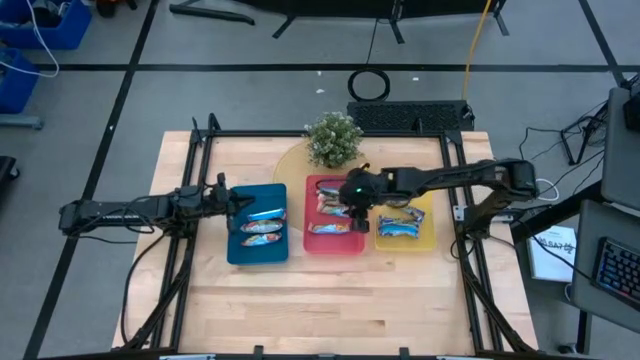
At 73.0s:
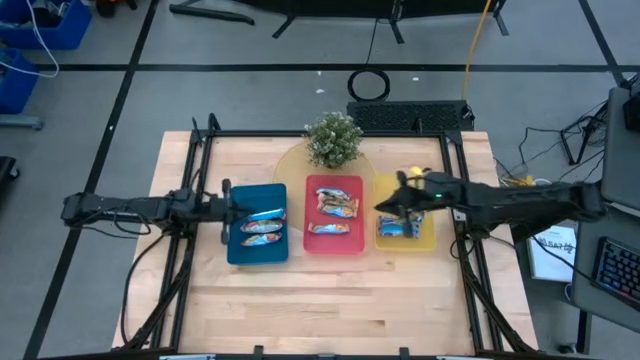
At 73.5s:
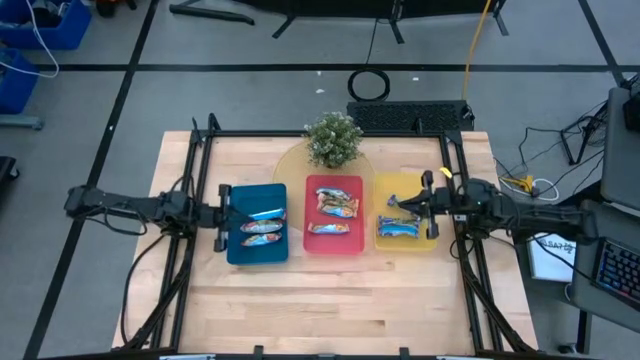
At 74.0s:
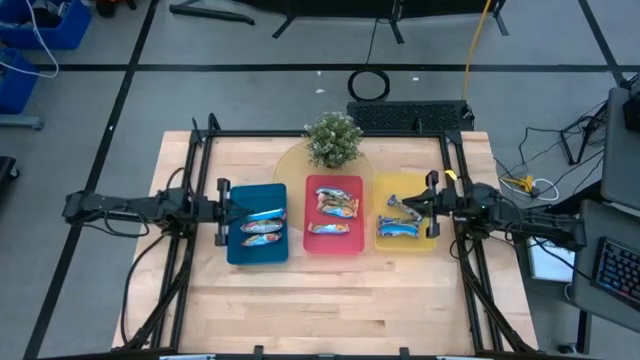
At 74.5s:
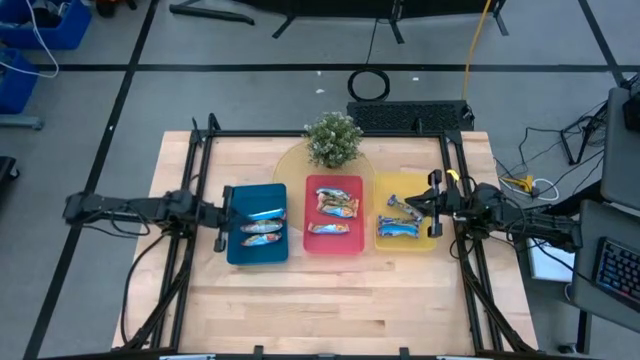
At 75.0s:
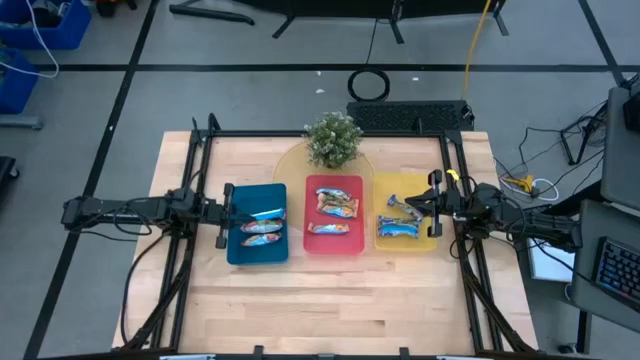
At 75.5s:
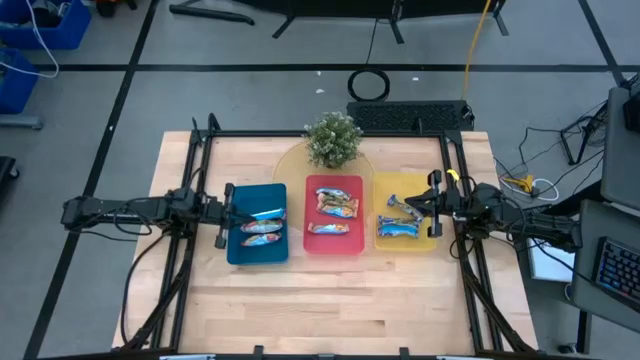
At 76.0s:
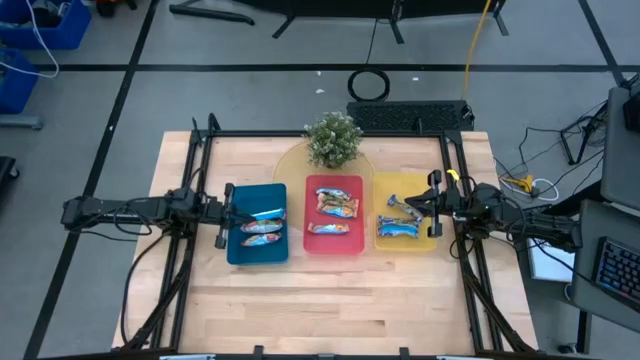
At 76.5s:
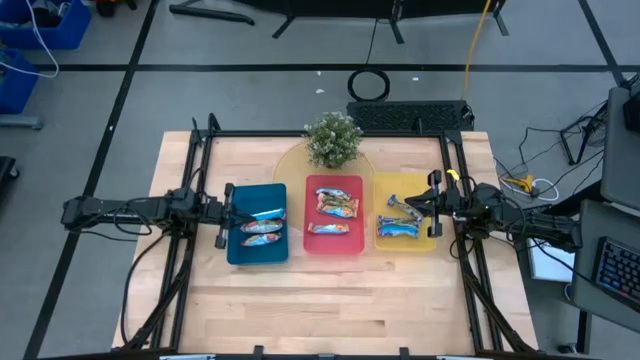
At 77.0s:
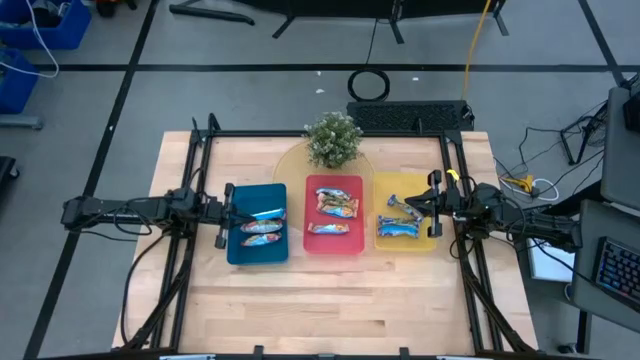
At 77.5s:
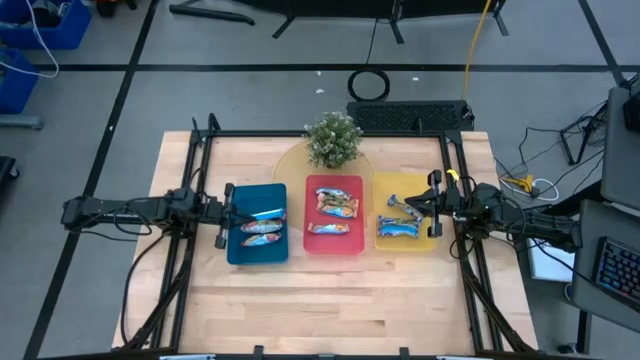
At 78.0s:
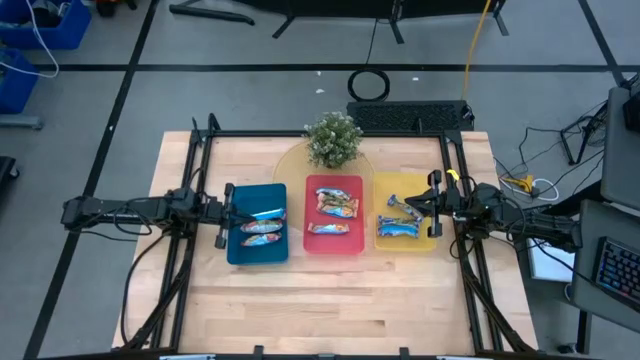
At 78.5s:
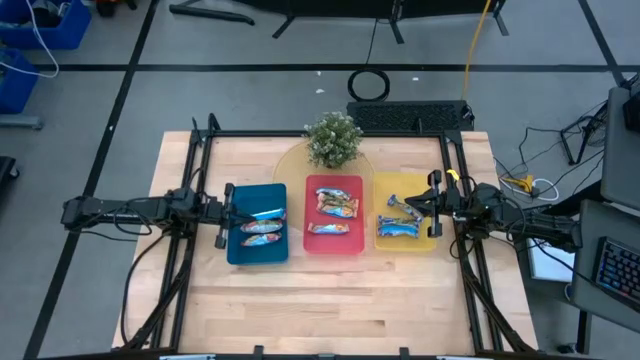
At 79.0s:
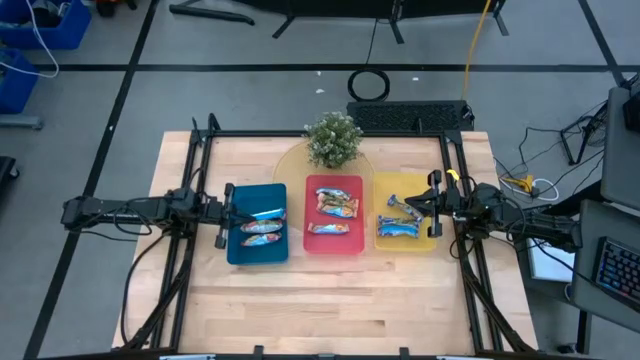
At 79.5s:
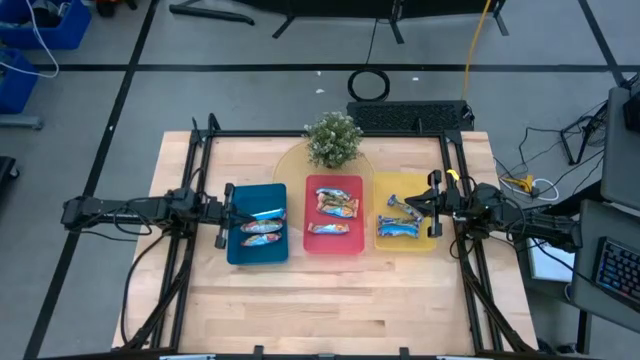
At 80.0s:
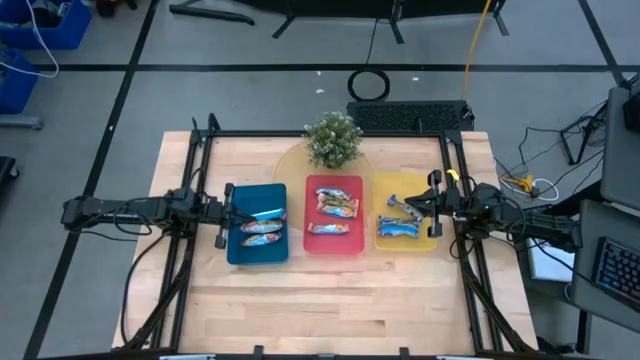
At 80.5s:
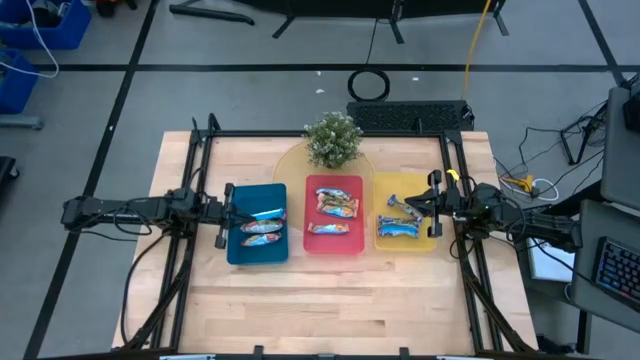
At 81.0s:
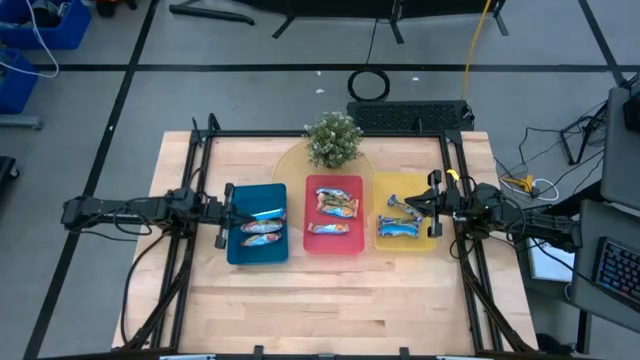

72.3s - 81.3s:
Task: Pick and place Granola Bars by type
Return to Home Position

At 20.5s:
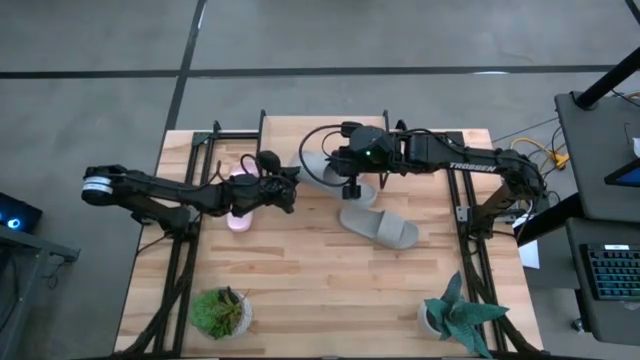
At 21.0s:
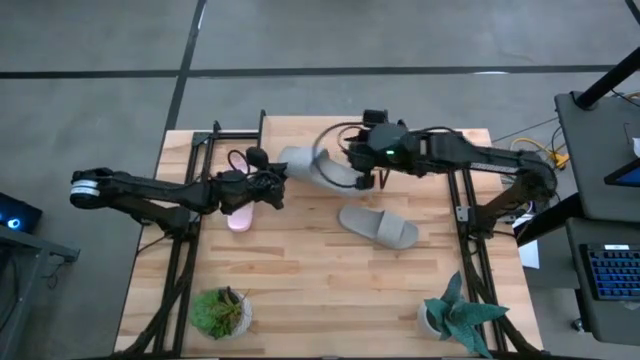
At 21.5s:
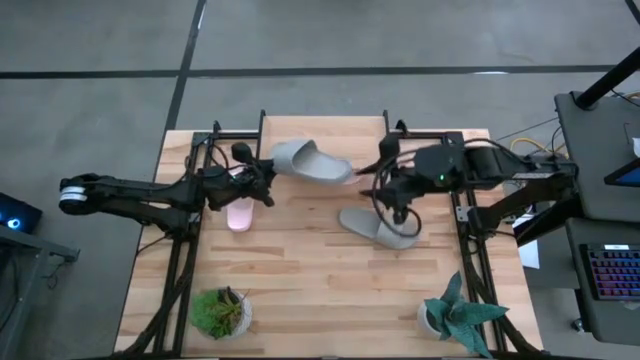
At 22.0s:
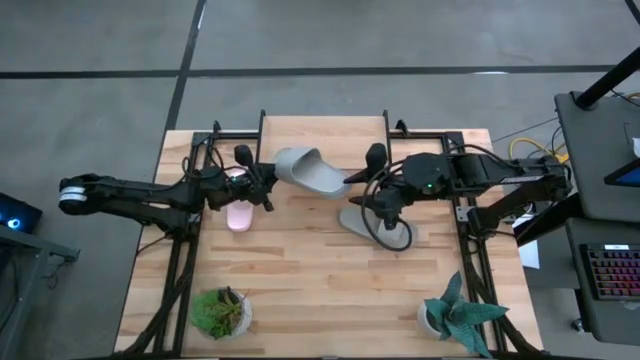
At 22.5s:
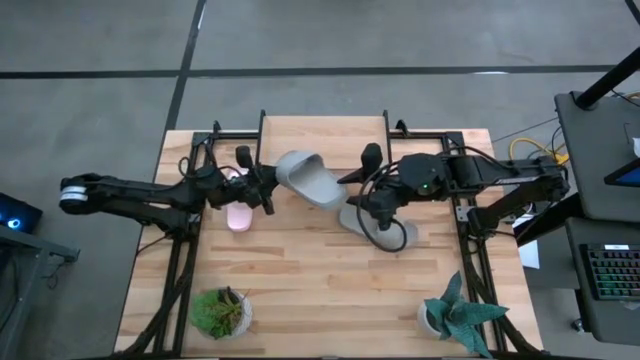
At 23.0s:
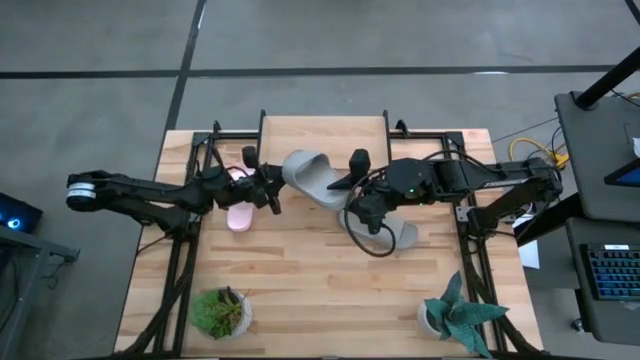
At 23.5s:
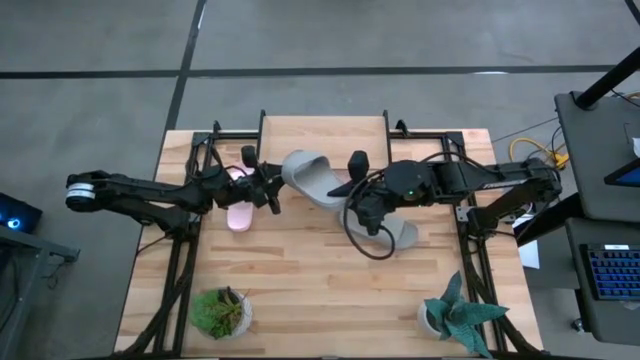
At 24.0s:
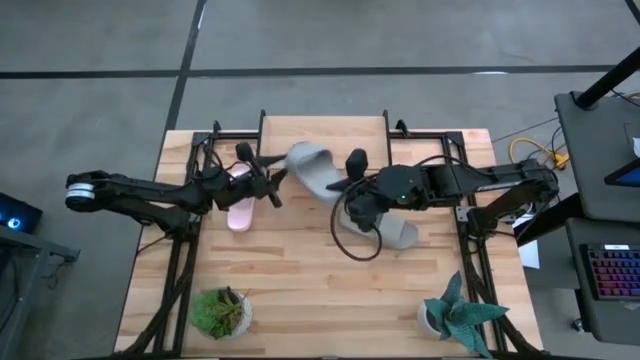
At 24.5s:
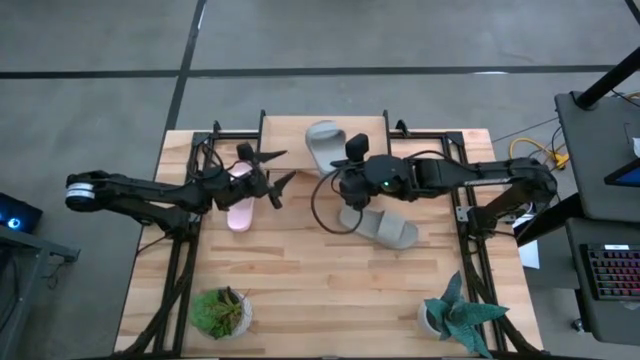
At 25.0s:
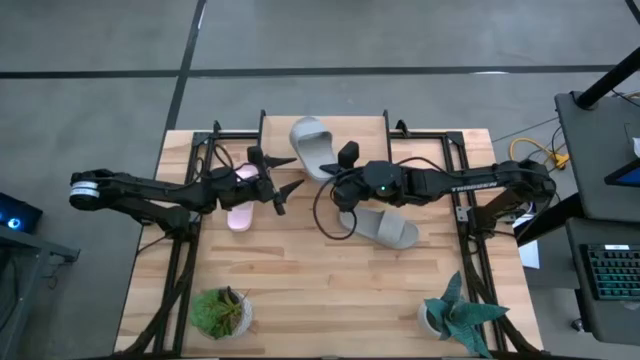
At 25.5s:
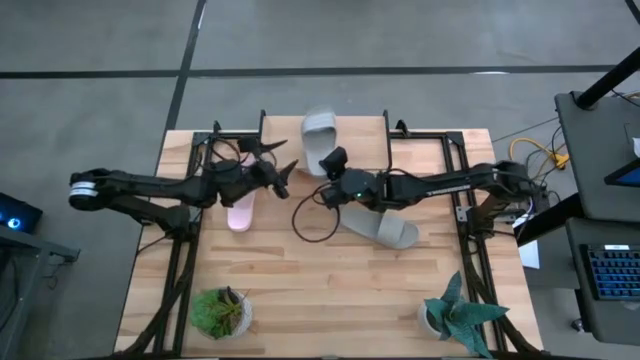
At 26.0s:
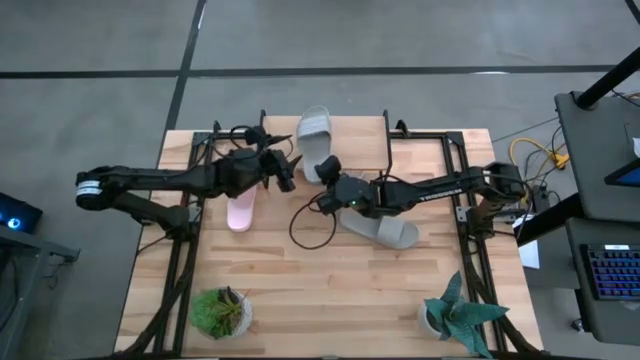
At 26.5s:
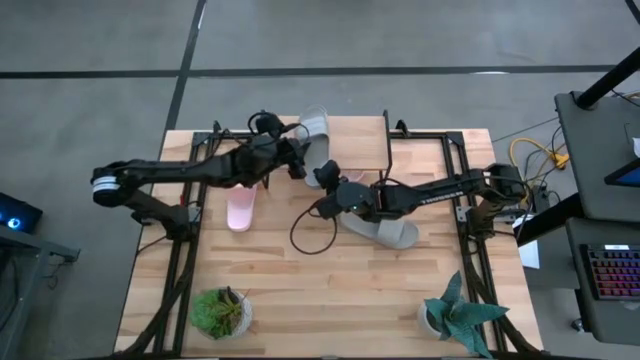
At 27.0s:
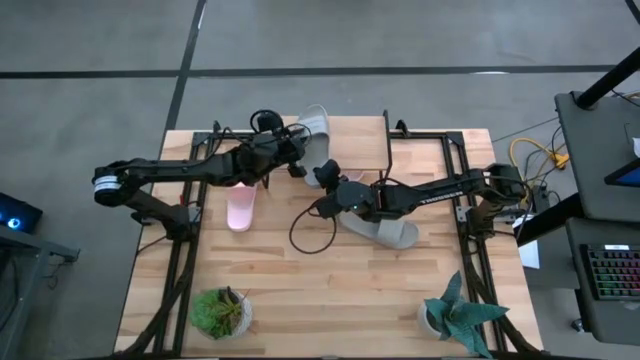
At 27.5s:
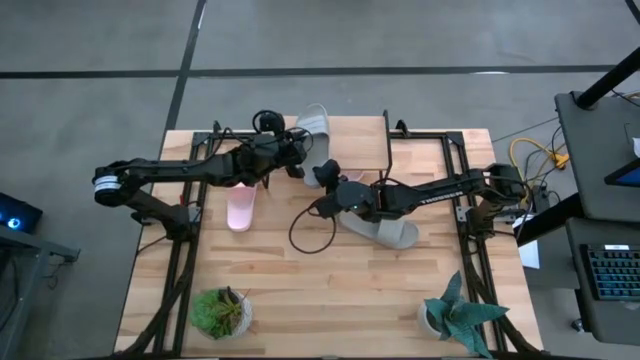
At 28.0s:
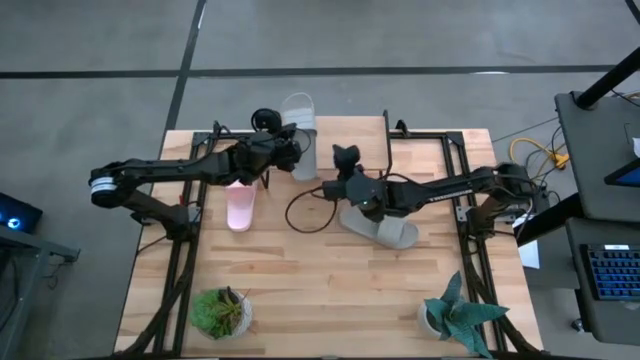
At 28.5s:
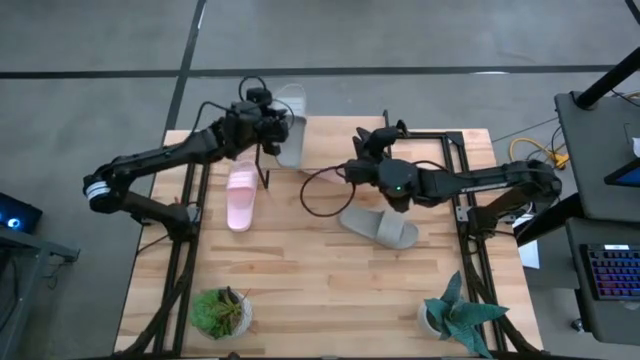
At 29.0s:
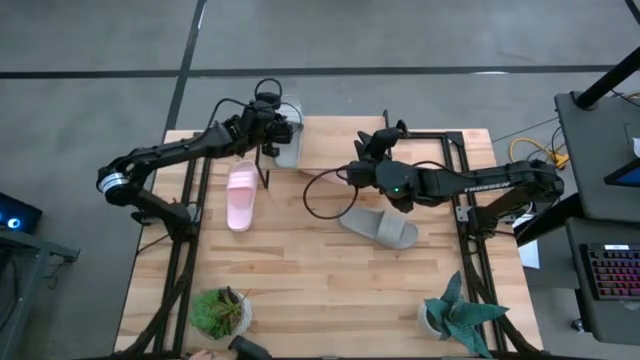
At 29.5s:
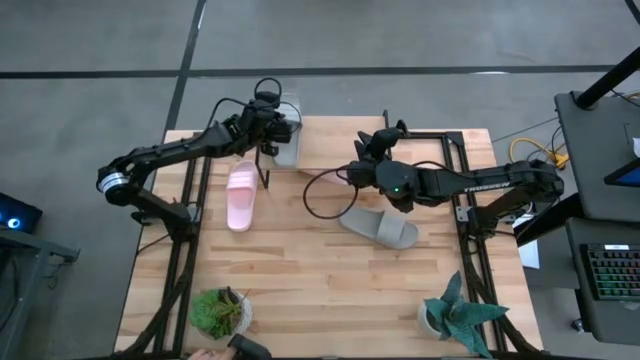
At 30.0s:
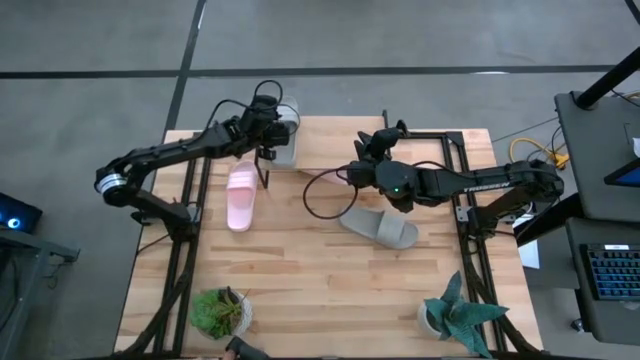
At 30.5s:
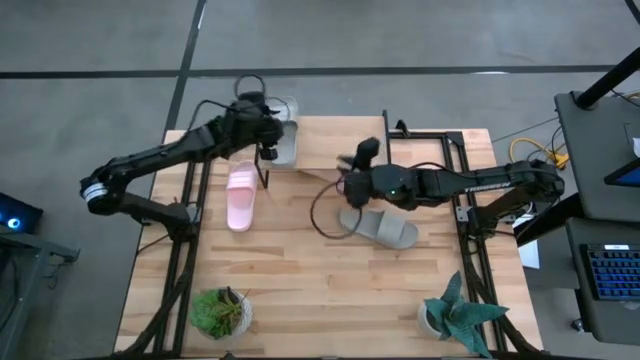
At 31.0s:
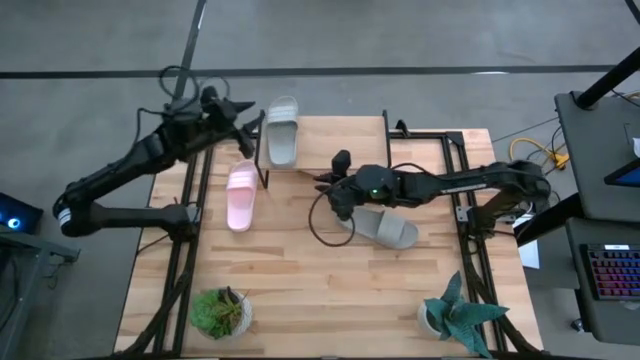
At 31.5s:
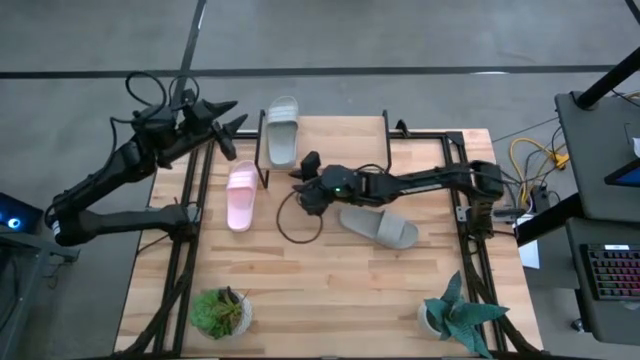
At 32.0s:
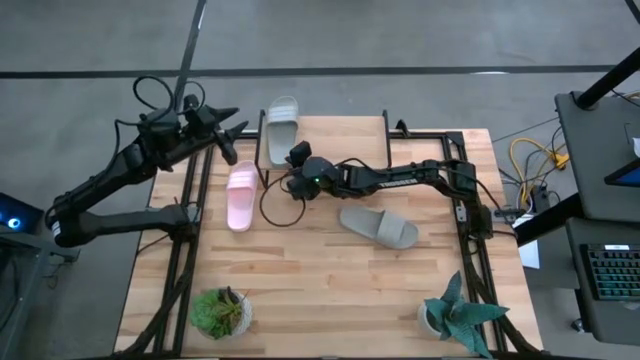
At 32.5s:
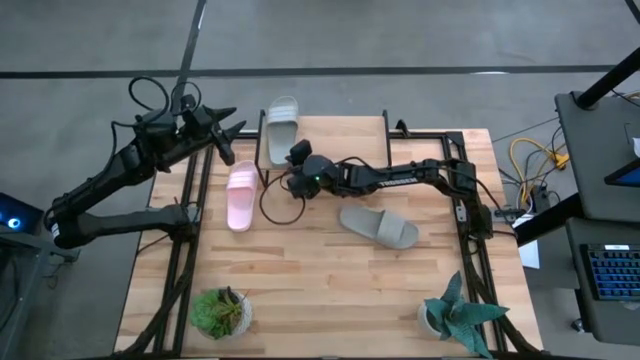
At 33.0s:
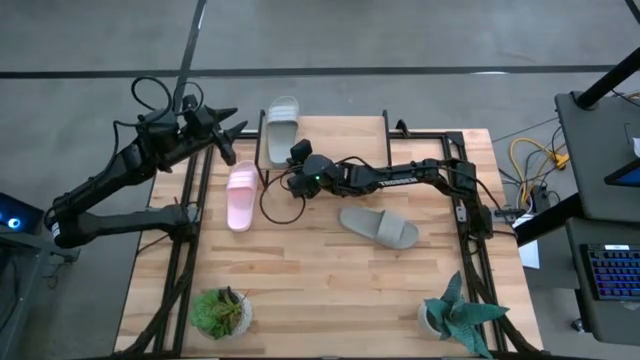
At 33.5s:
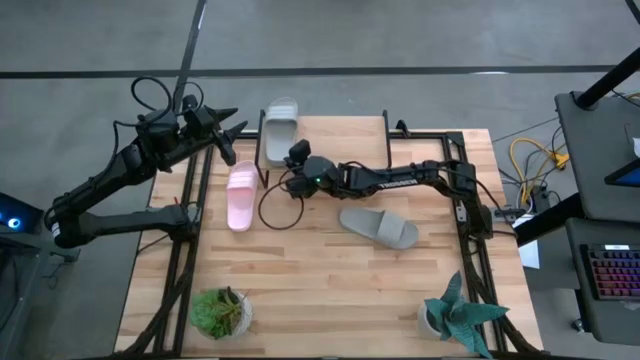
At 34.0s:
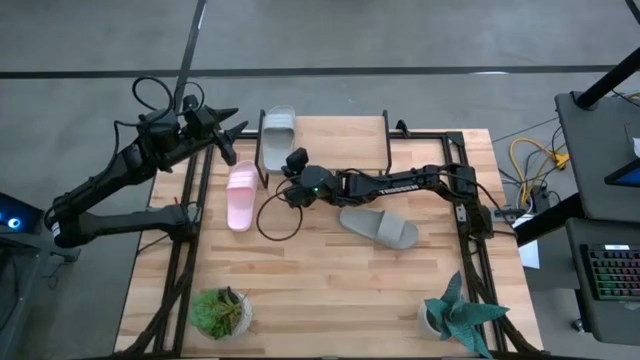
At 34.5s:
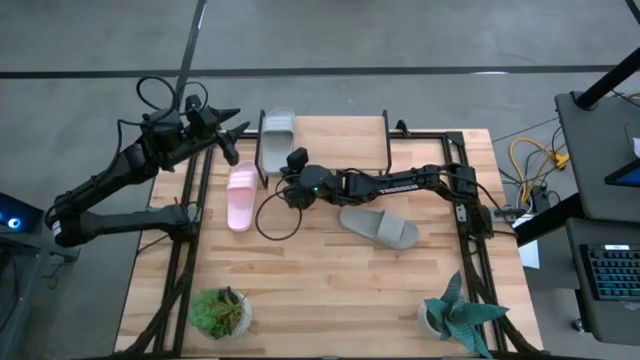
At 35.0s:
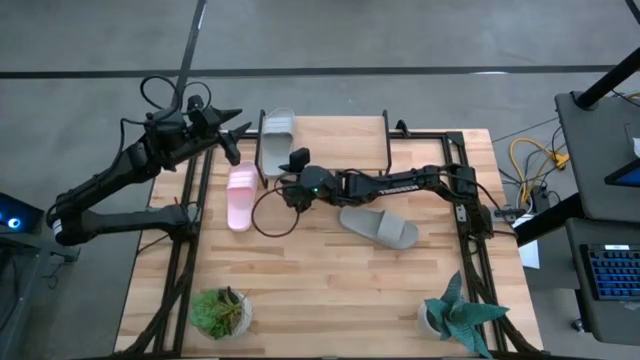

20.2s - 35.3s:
Task: Pick and place slides into the shelf
Put the top gray slipper on the shelf
